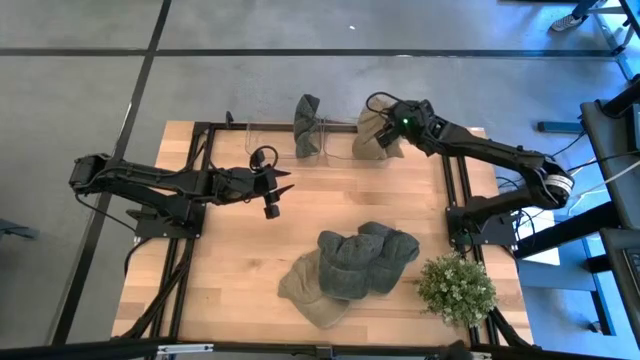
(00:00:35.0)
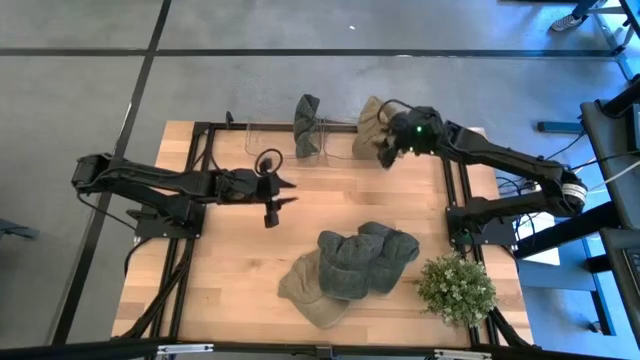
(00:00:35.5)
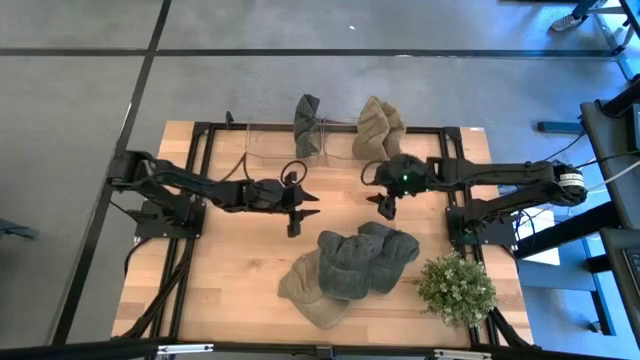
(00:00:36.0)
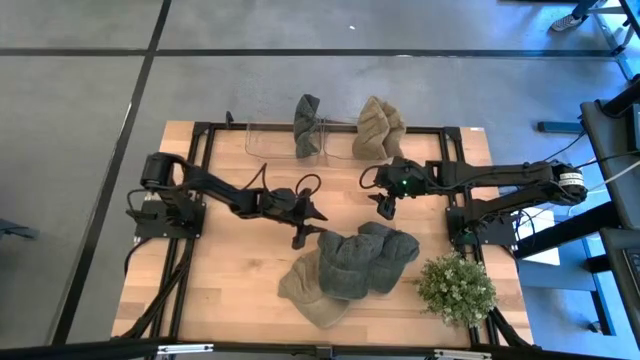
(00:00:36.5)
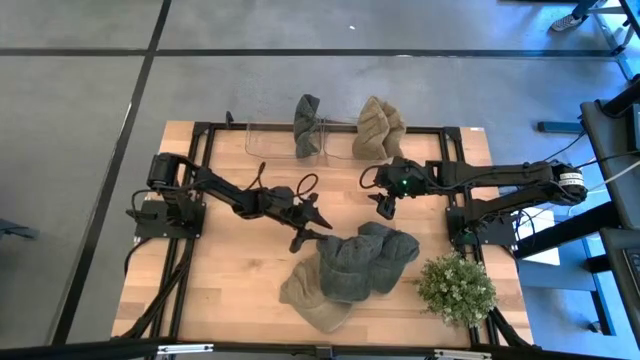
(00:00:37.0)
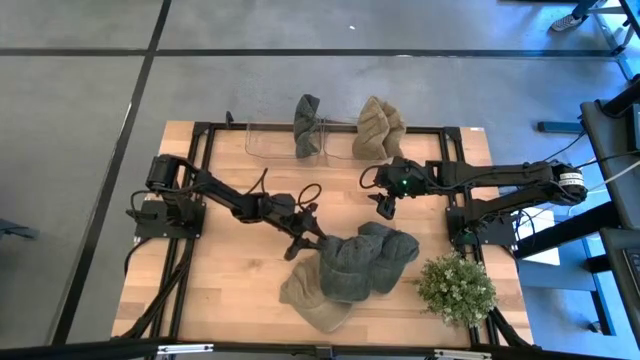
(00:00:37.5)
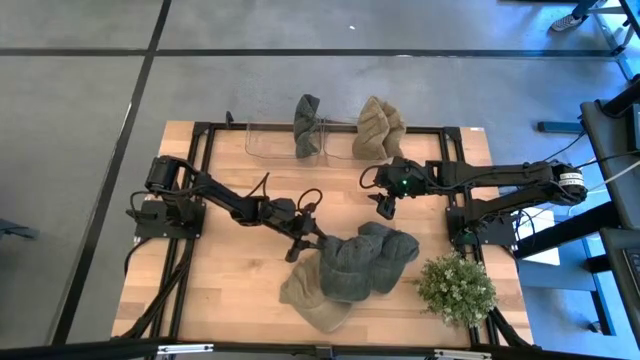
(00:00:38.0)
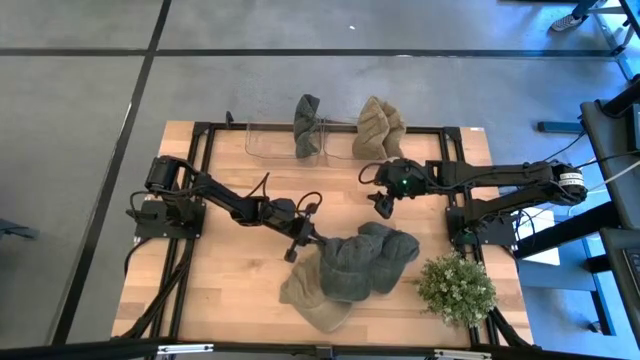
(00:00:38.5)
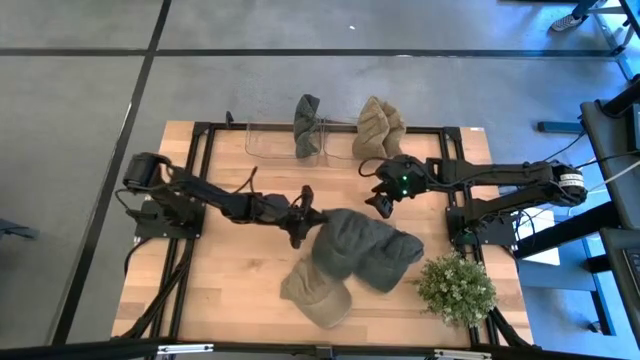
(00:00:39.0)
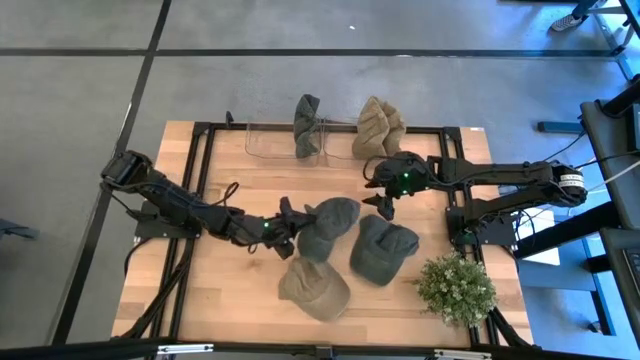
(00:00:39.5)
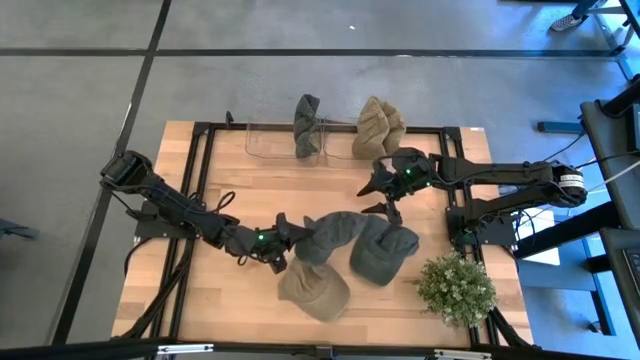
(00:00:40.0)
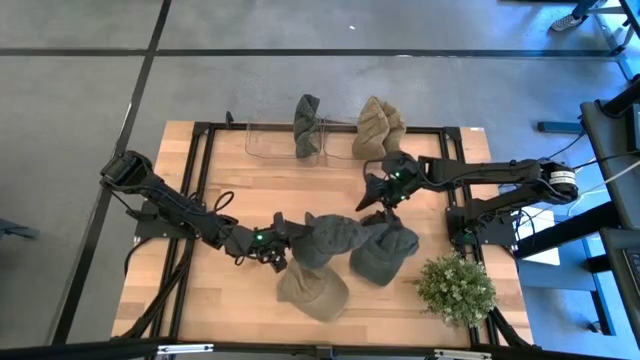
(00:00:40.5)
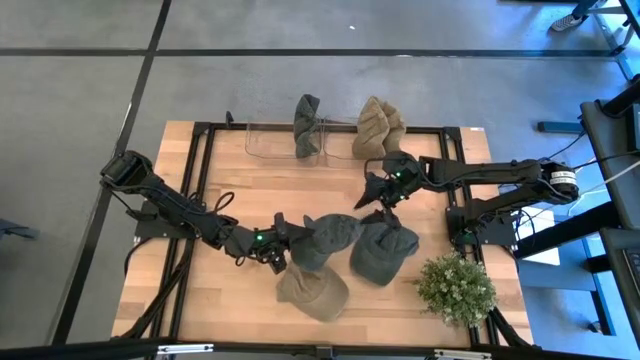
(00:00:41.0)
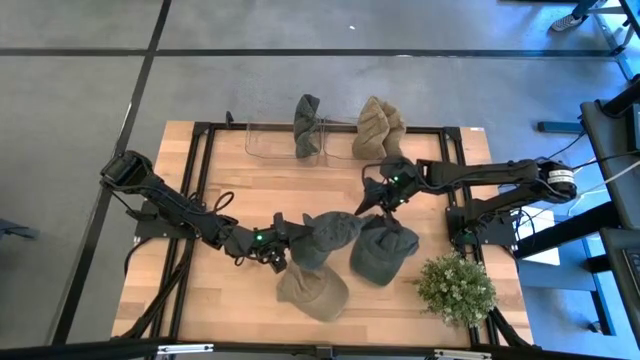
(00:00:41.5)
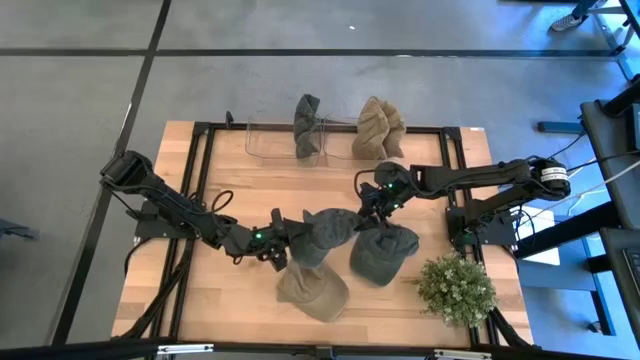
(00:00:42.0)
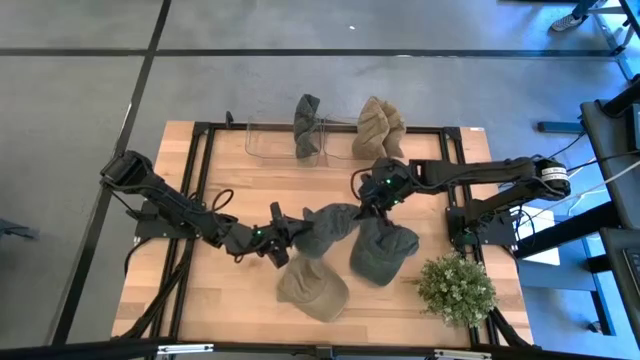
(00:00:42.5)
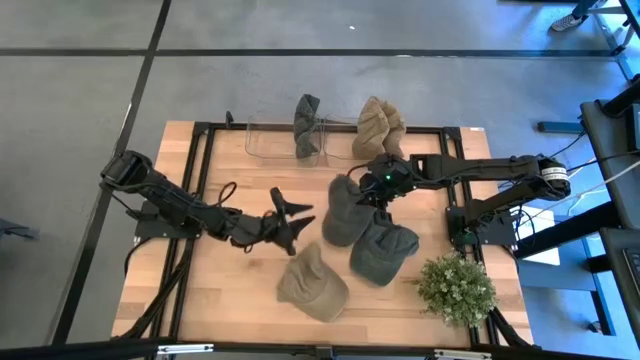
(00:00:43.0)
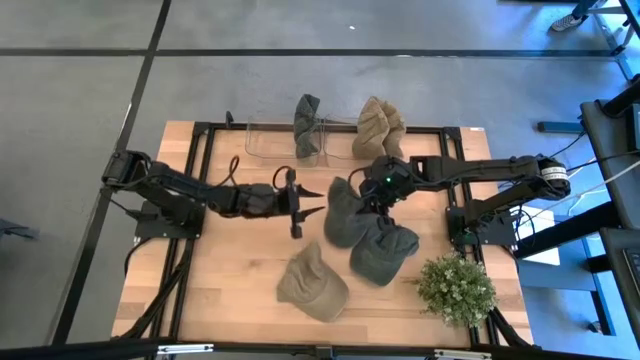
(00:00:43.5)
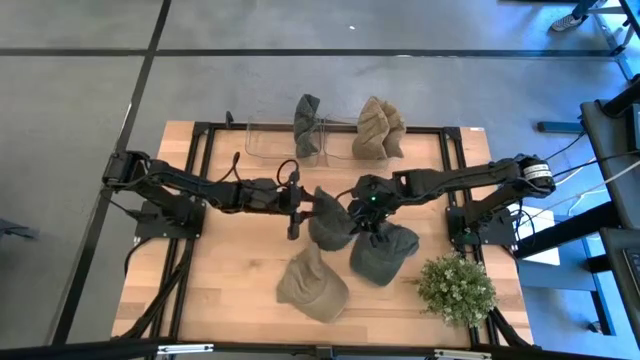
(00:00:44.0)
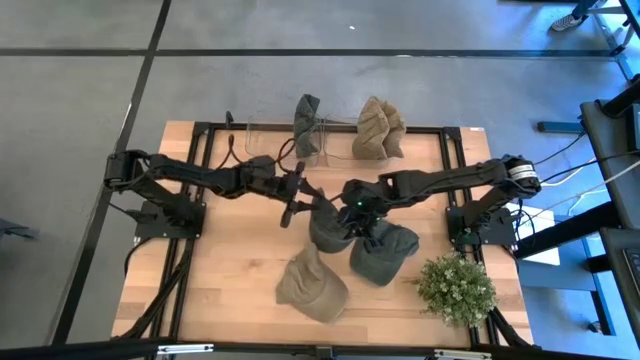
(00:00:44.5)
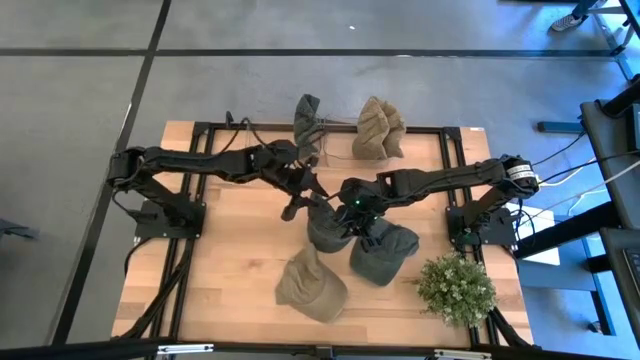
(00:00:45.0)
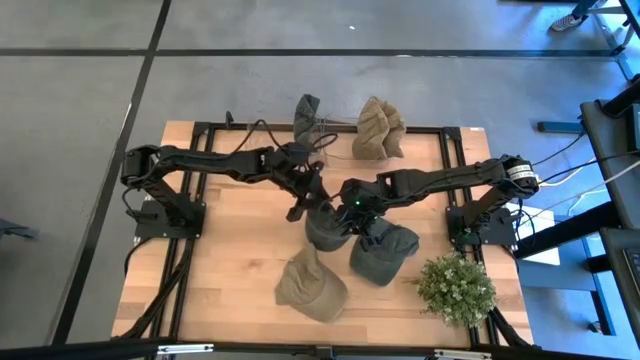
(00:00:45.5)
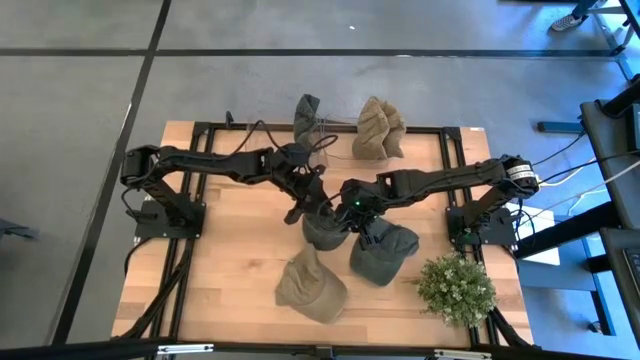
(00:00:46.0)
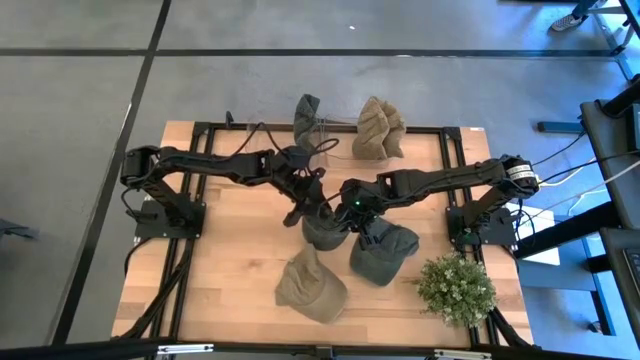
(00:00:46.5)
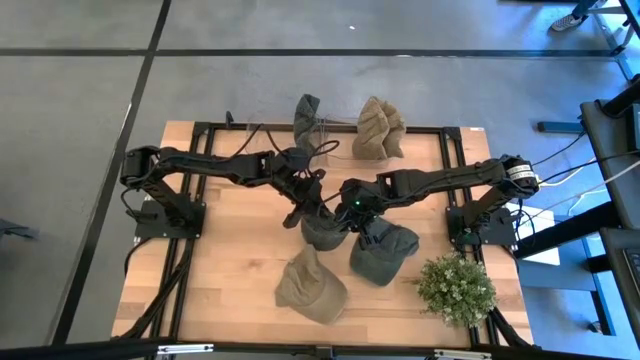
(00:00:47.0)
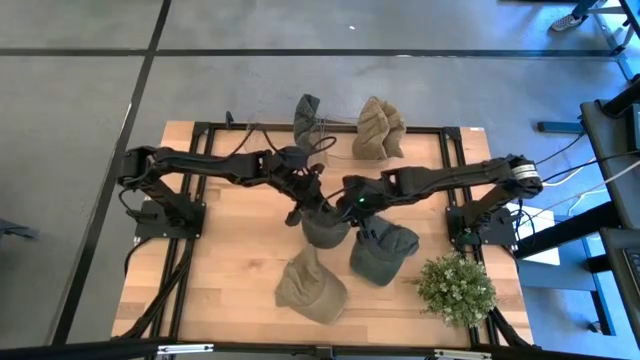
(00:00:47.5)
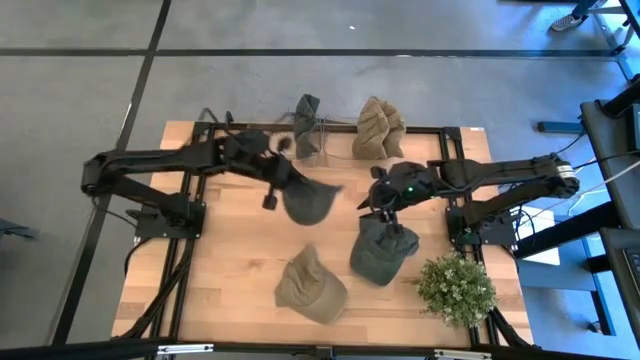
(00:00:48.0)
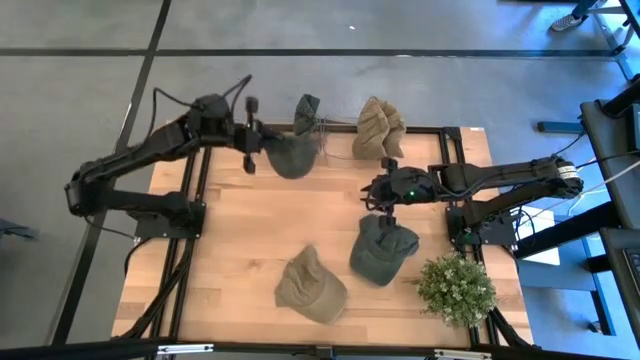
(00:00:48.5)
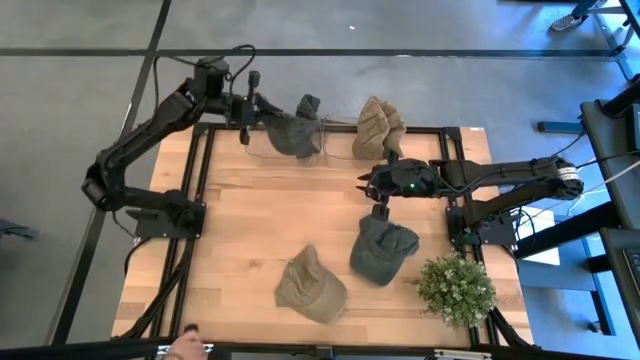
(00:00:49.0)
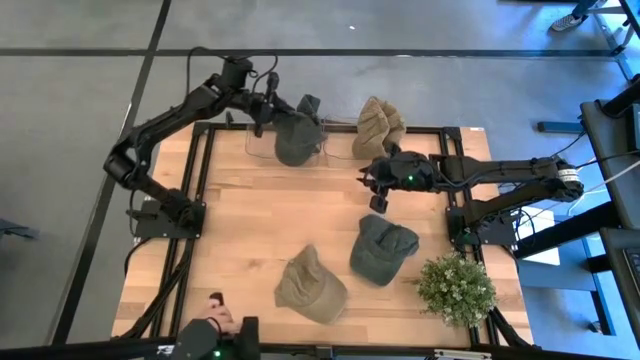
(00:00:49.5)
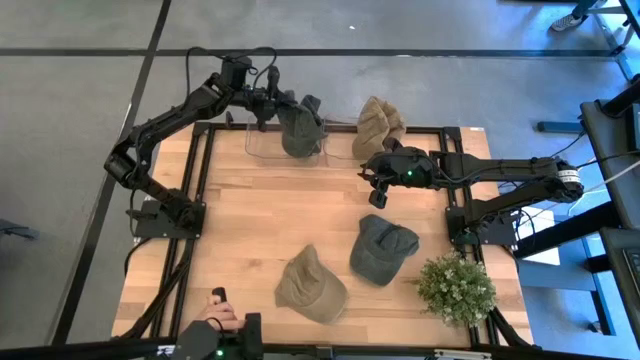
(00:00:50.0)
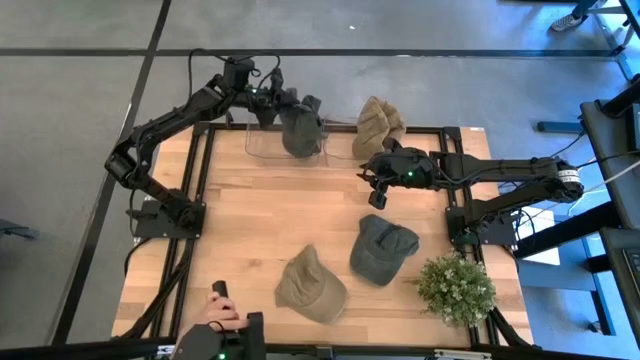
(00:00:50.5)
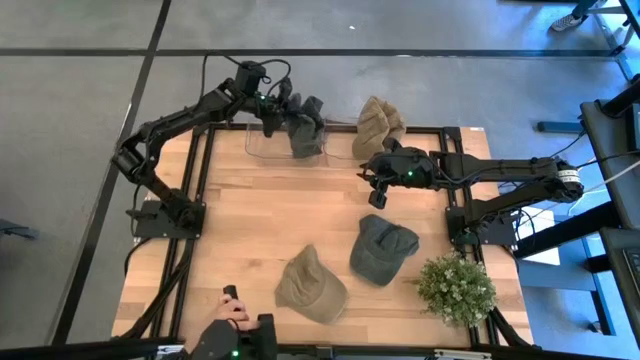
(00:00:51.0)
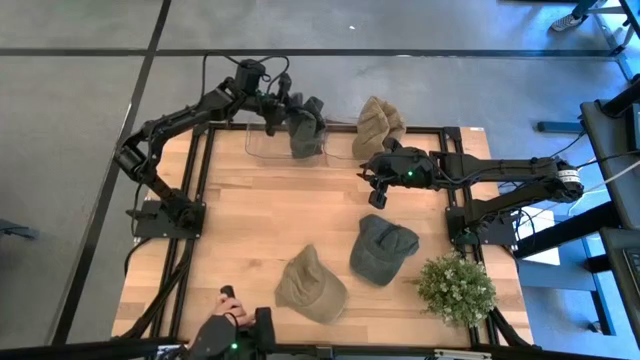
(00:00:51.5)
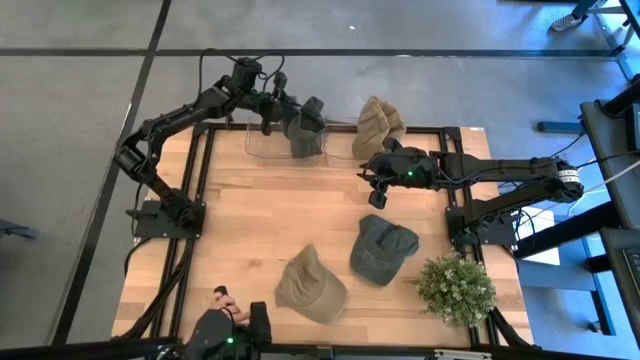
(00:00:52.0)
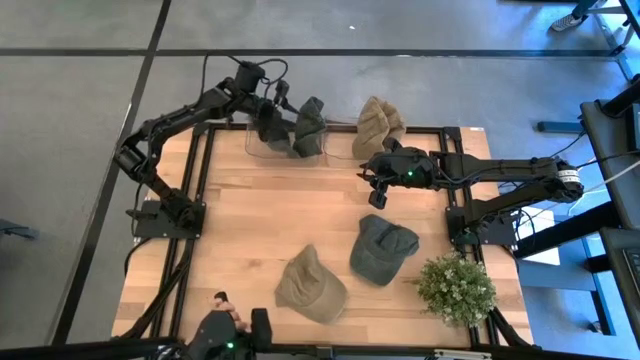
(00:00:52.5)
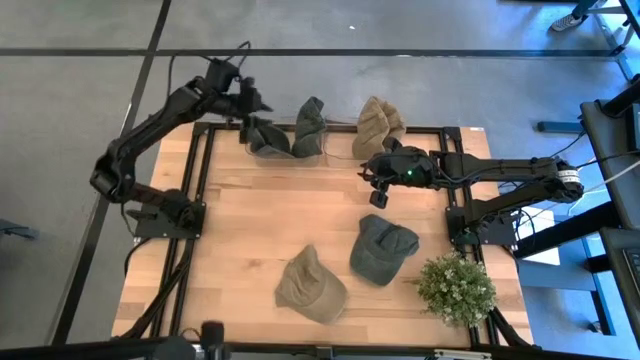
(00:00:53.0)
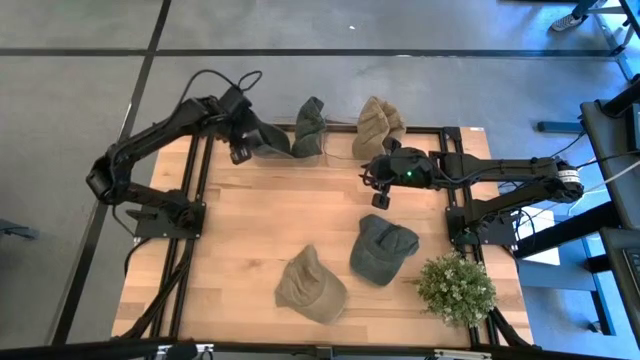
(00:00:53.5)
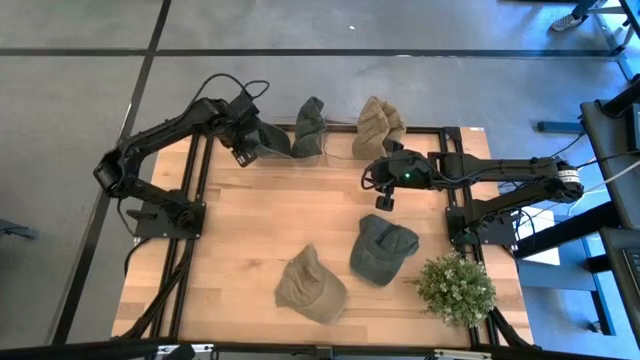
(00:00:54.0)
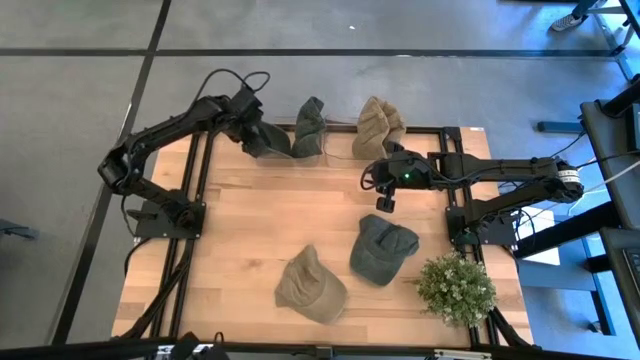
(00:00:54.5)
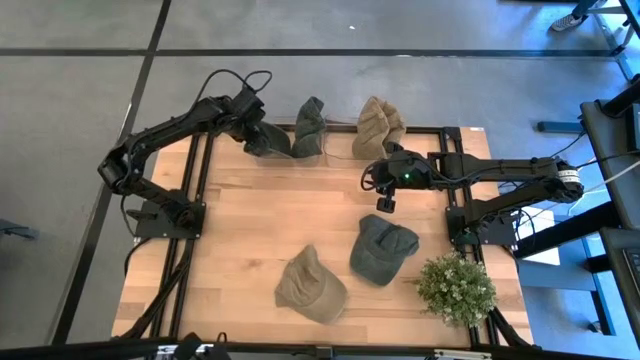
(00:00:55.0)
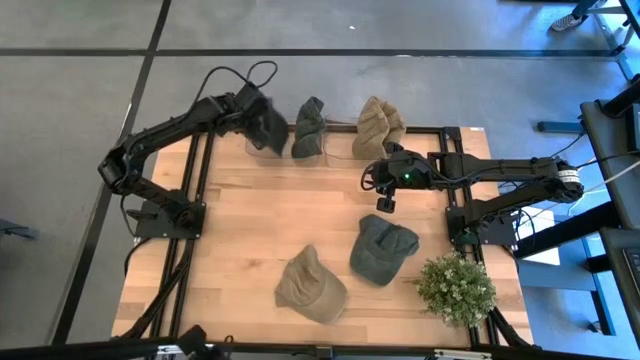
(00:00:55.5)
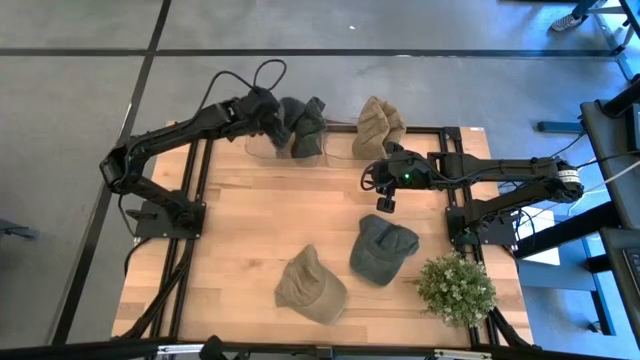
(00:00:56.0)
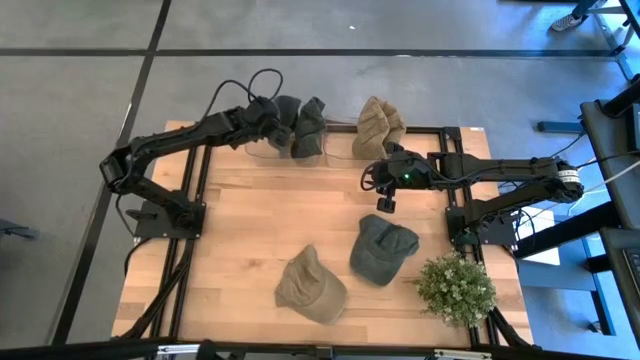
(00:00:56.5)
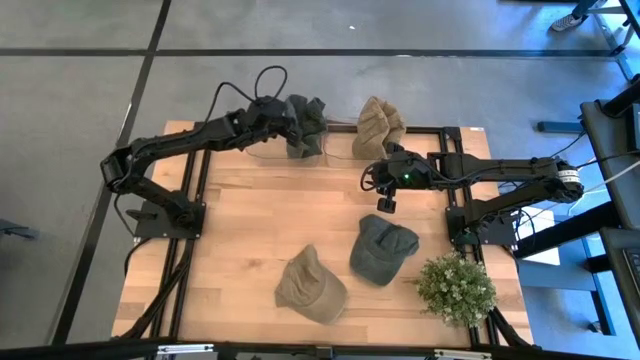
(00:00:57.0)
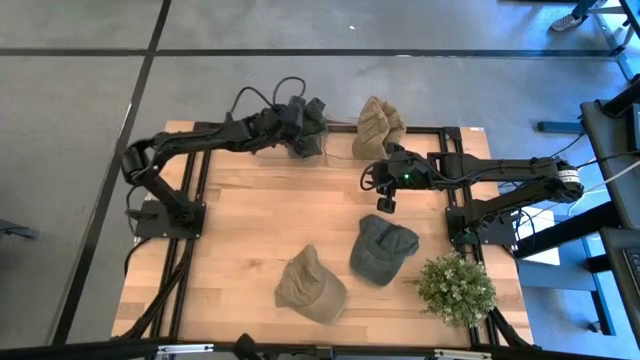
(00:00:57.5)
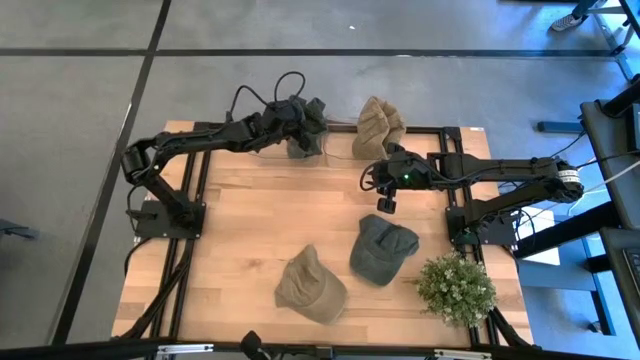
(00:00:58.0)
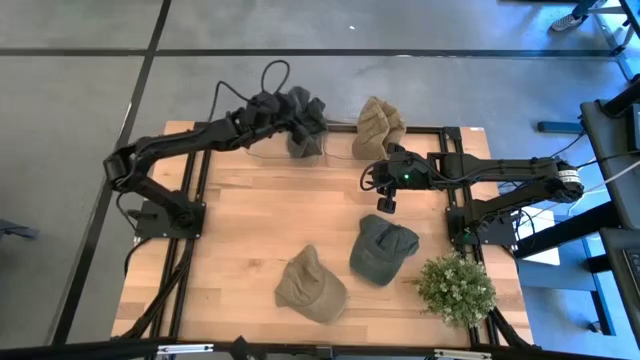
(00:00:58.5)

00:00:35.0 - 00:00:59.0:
Task: Pick & Place hat
Put the left black cap into the left transparent bin
